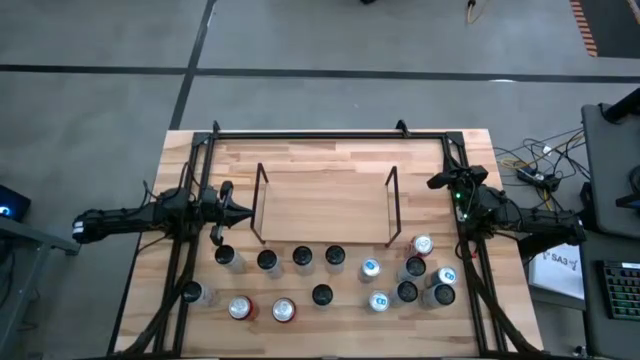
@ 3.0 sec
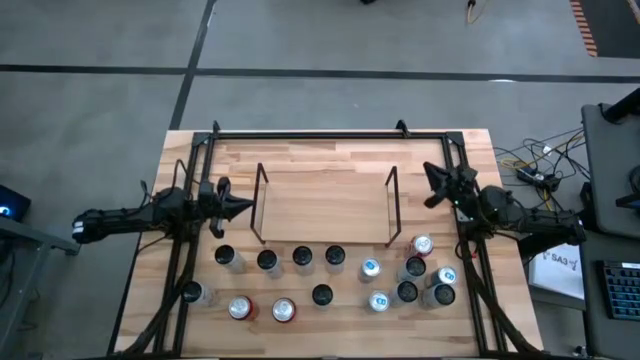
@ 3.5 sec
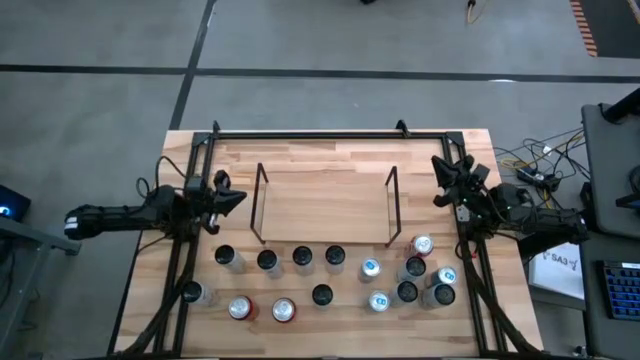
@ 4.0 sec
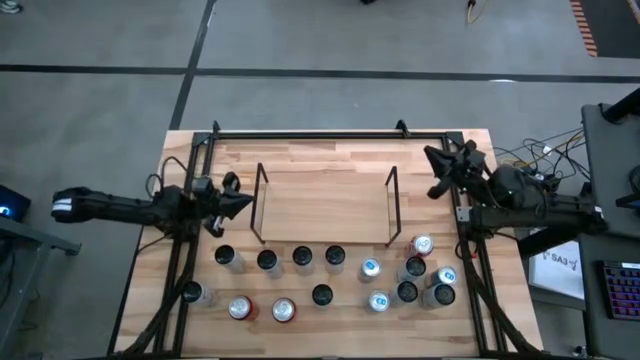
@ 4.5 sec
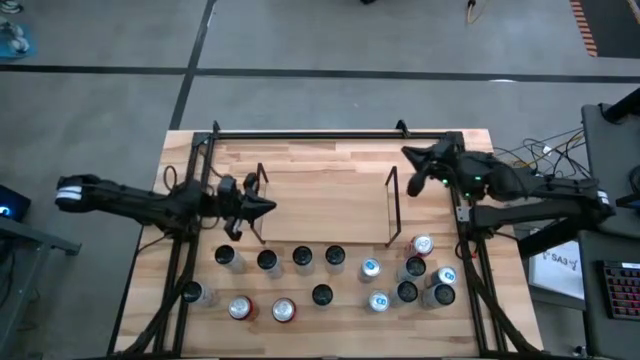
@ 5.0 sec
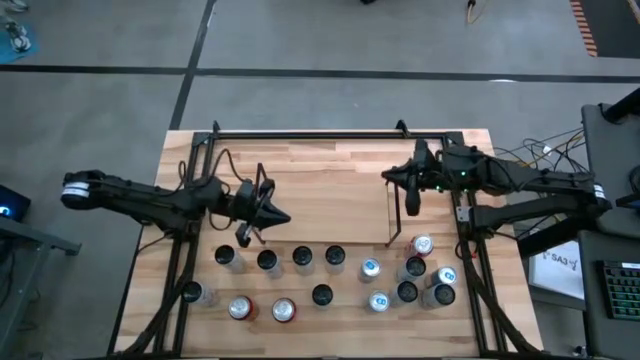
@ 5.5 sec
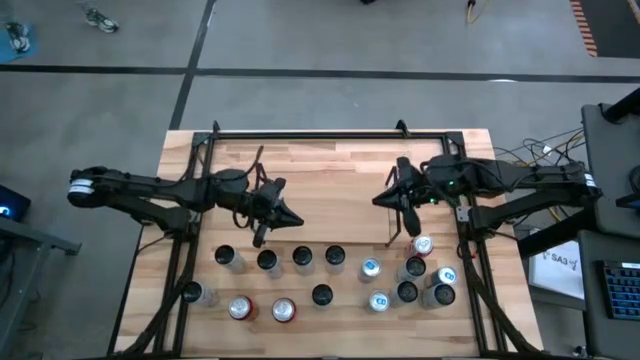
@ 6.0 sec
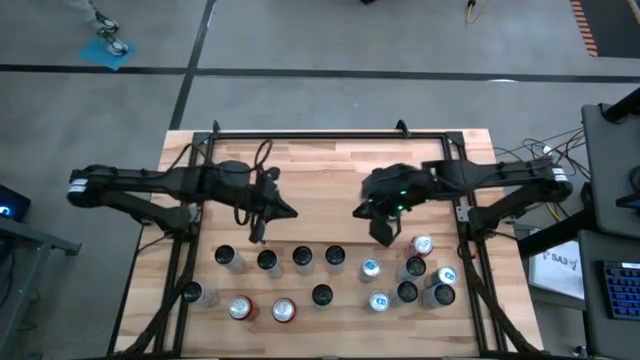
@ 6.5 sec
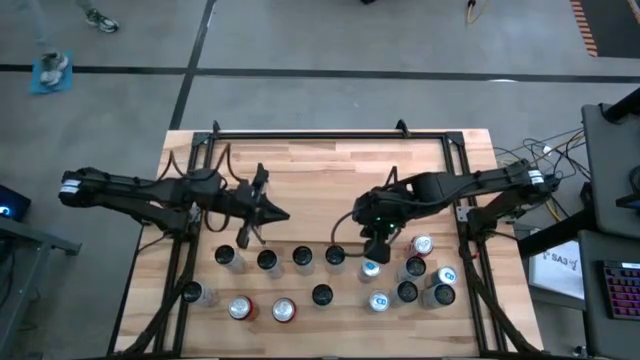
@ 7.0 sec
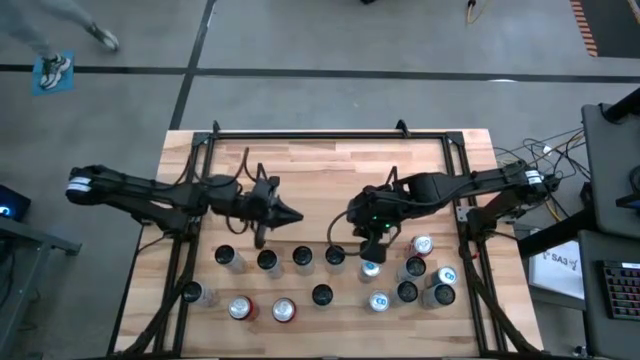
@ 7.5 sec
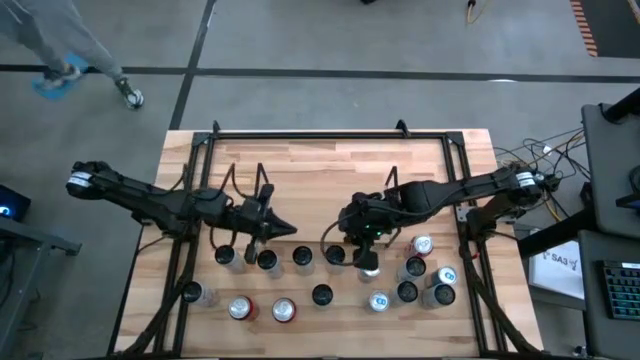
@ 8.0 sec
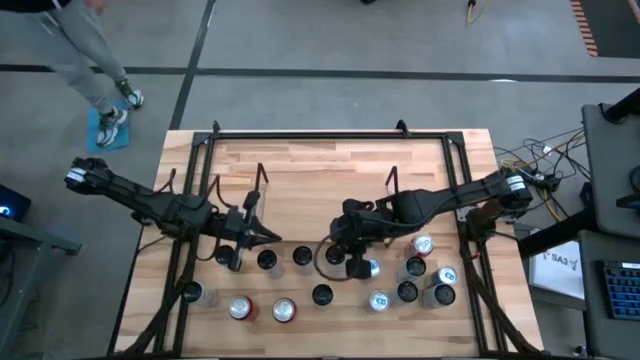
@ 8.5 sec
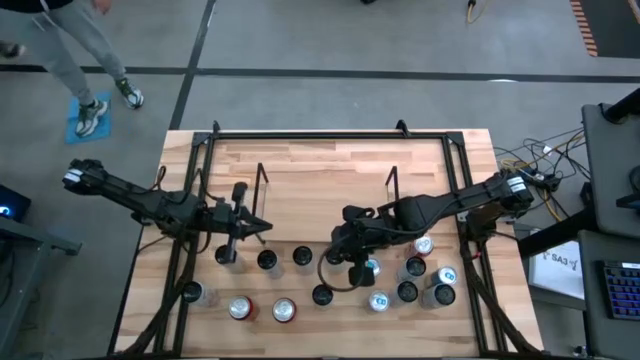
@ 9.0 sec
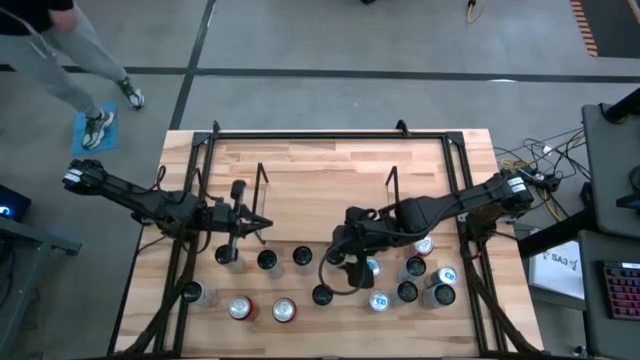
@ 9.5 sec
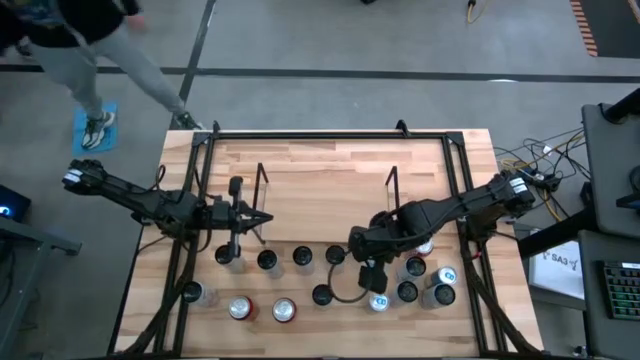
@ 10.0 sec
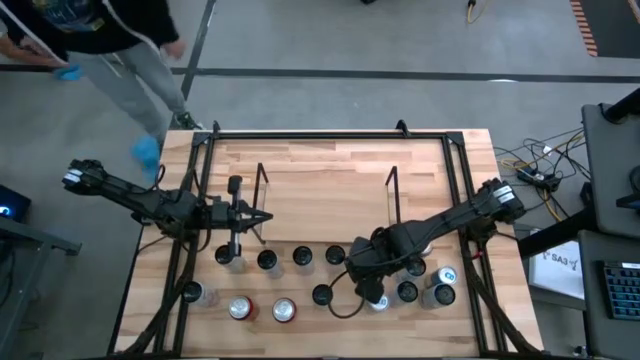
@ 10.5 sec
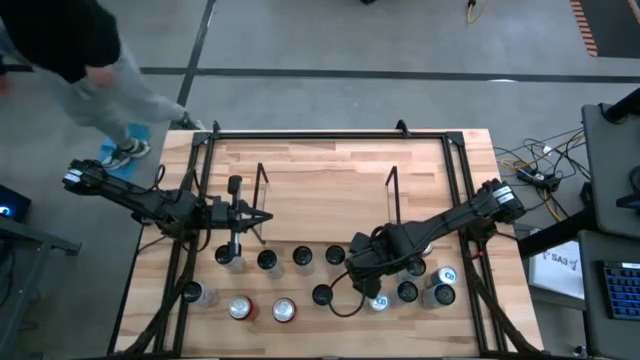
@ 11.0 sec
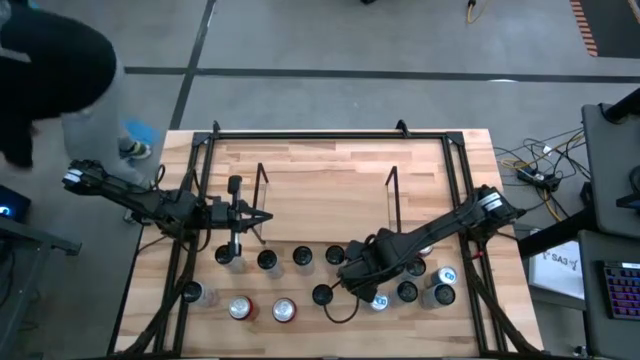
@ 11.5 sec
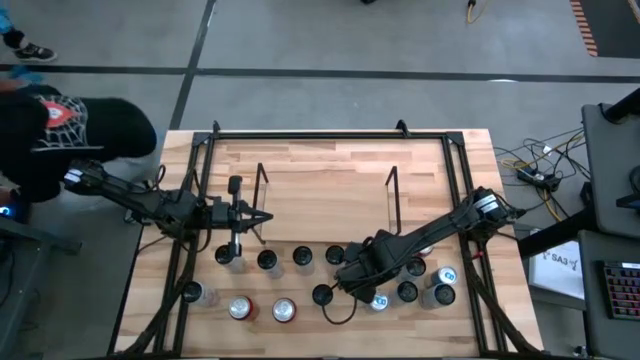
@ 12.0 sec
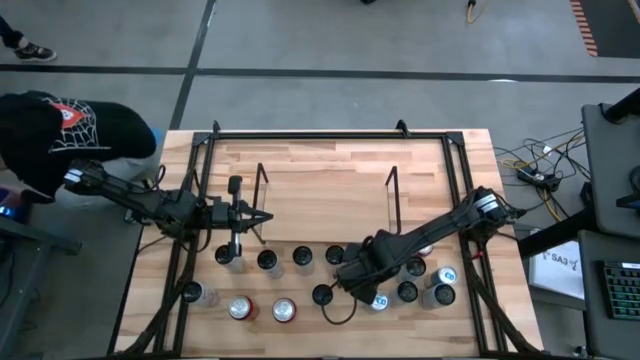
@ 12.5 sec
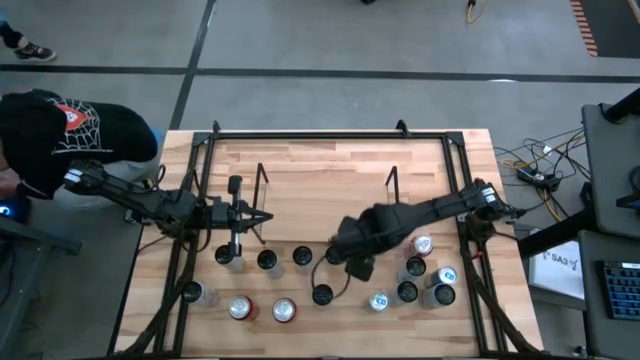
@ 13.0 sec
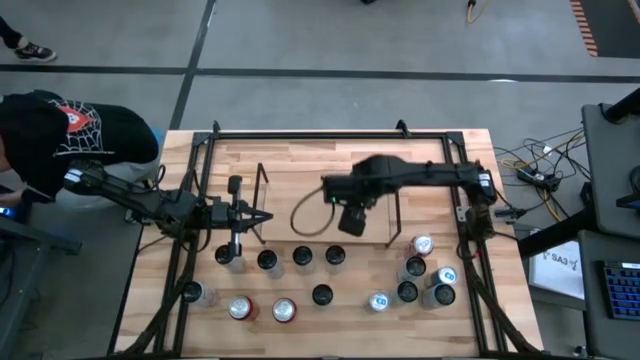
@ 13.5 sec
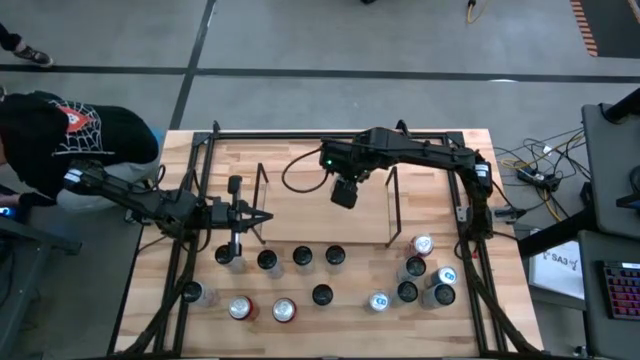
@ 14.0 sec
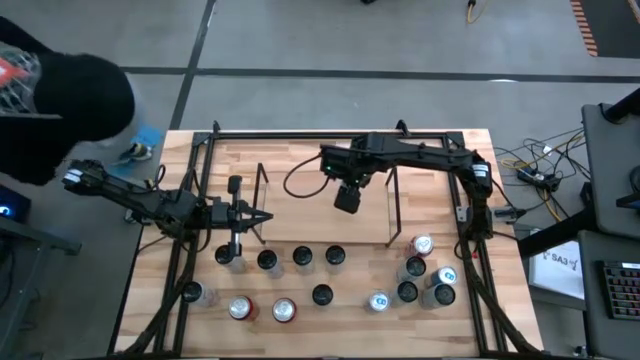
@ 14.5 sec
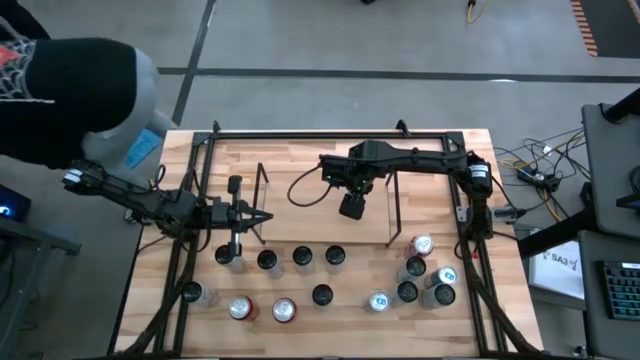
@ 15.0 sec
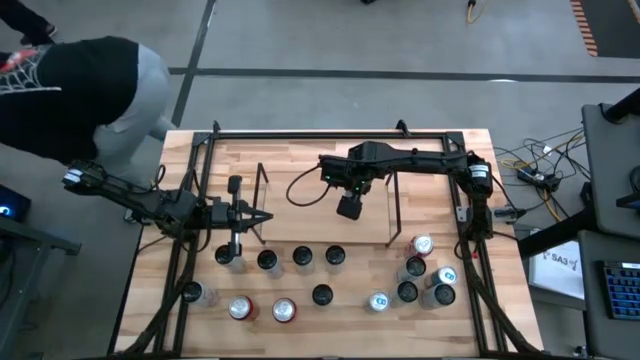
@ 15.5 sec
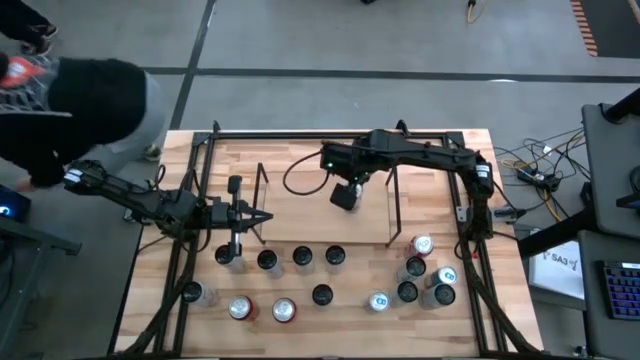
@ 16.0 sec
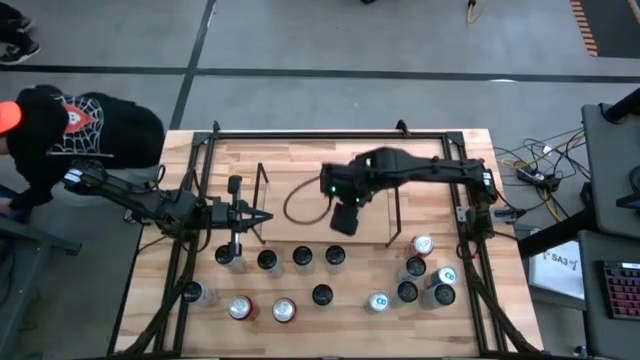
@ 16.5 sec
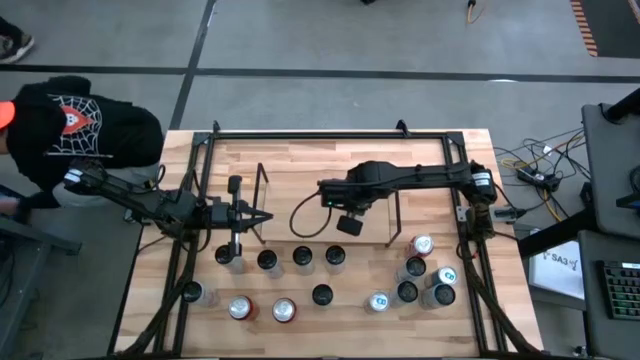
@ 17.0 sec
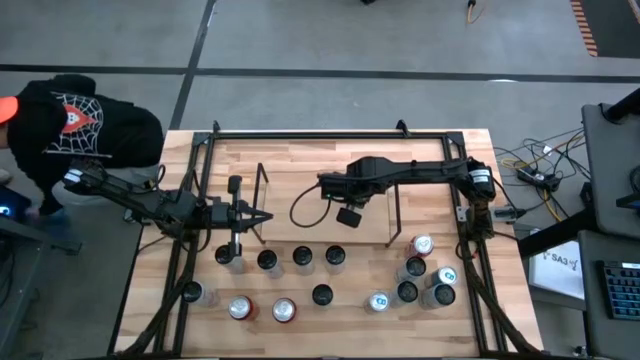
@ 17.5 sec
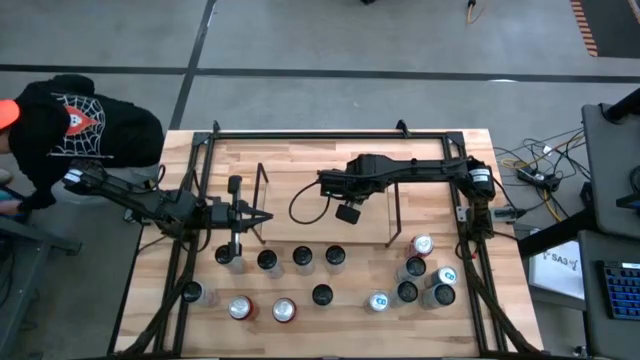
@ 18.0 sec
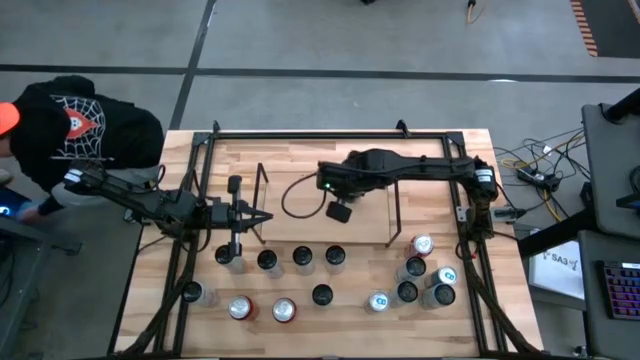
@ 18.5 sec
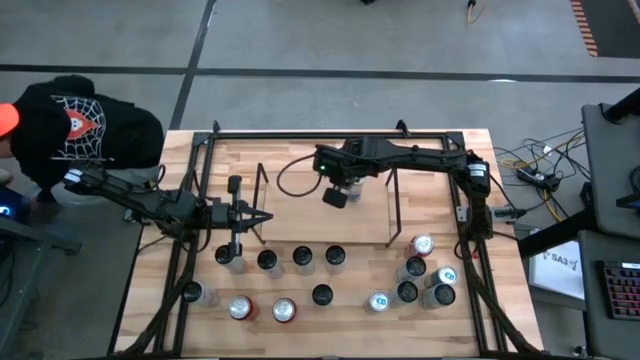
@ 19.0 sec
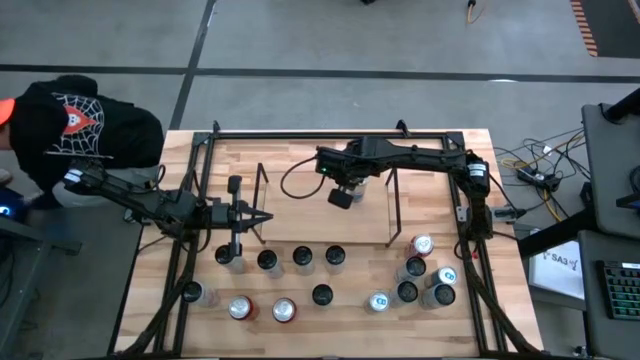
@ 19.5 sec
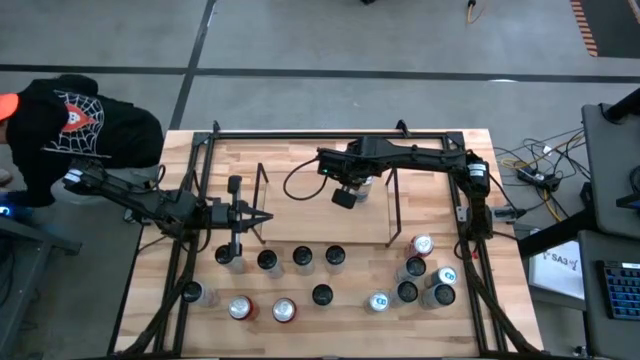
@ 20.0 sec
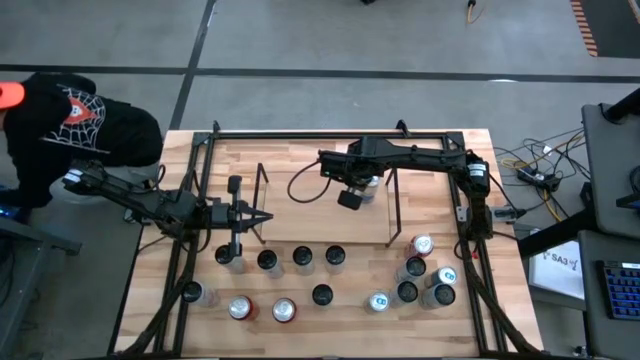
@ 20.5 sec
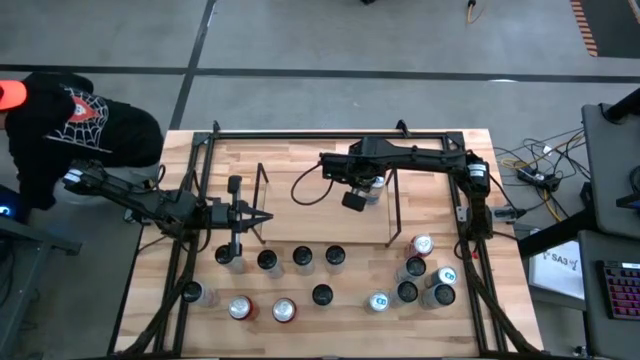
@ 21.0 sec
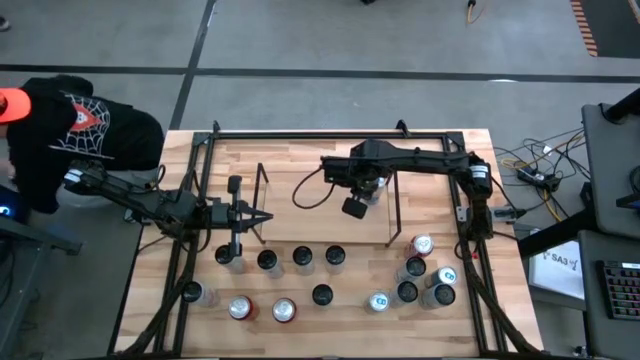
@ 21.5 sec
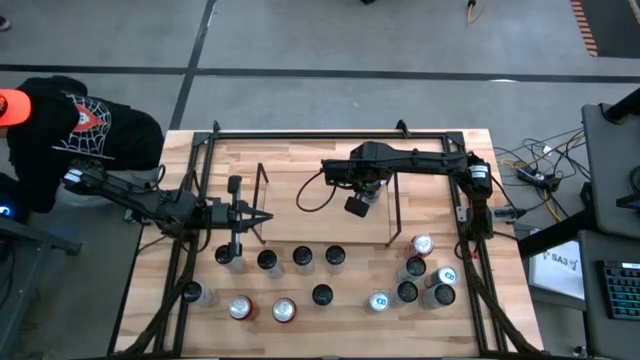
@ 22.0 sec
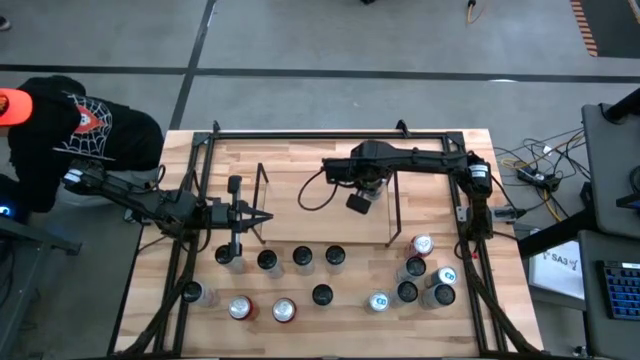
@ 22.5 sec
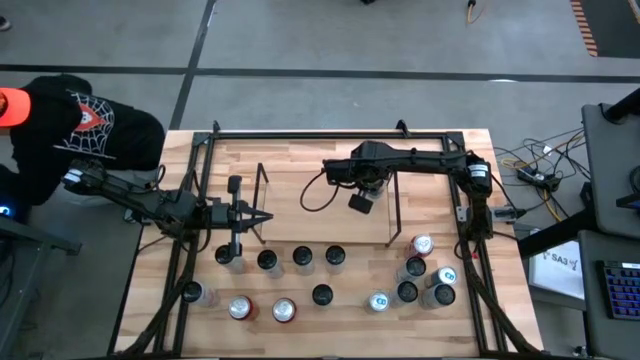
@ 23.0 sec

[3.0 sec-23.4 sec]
Task: Place canned beverage on shelf
Put the top left blue soda can on the shelf
